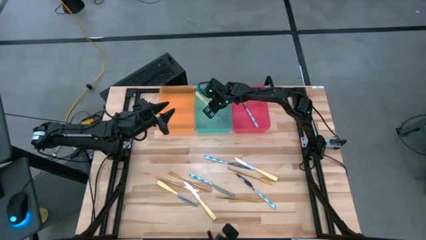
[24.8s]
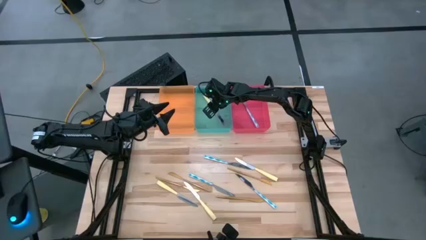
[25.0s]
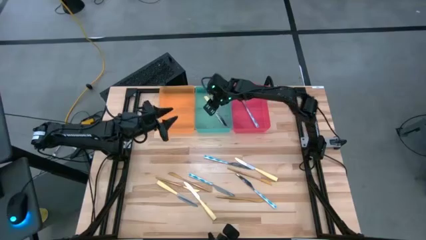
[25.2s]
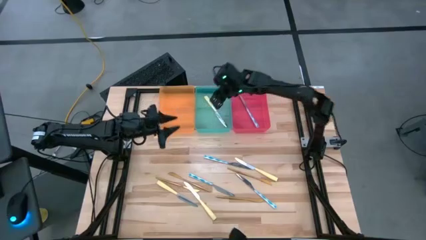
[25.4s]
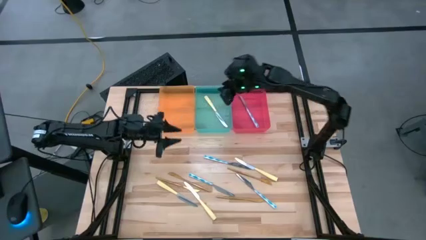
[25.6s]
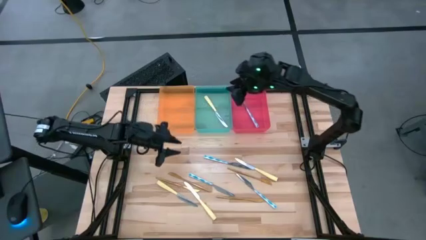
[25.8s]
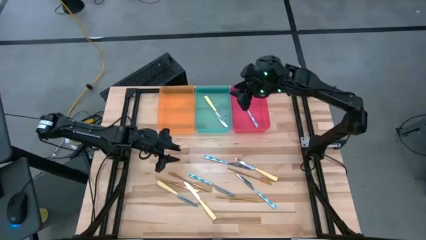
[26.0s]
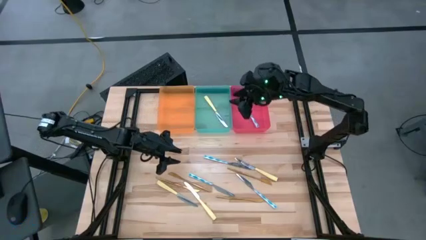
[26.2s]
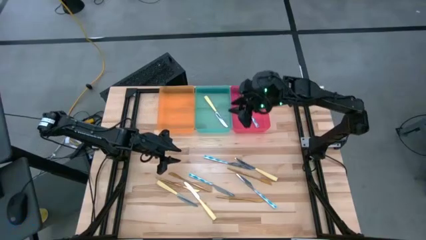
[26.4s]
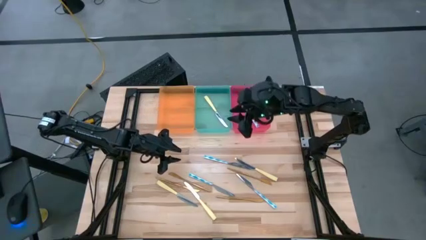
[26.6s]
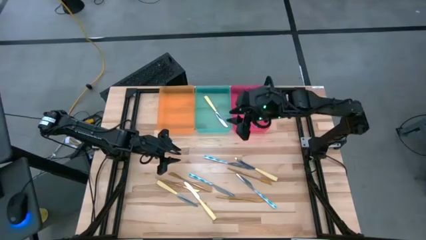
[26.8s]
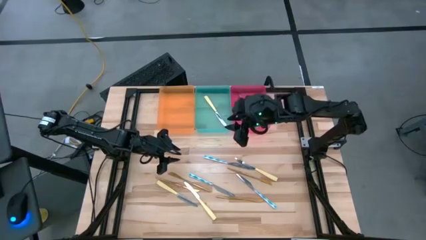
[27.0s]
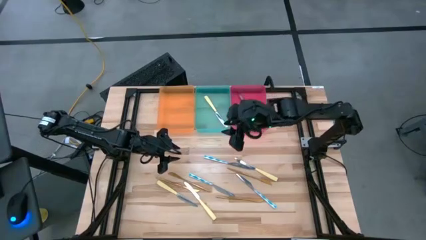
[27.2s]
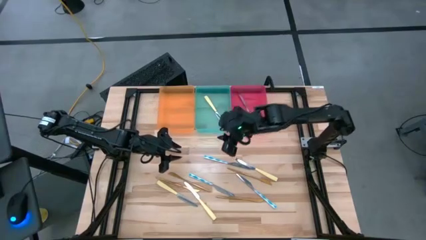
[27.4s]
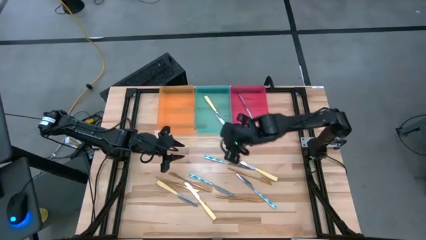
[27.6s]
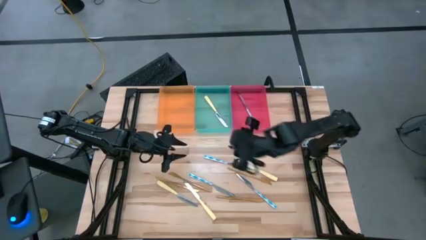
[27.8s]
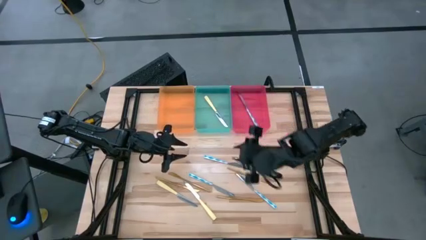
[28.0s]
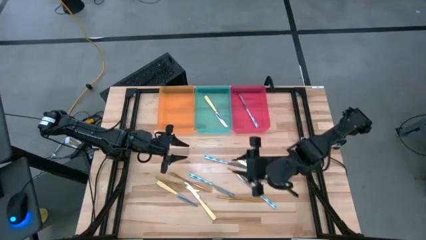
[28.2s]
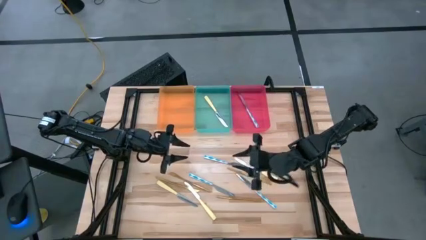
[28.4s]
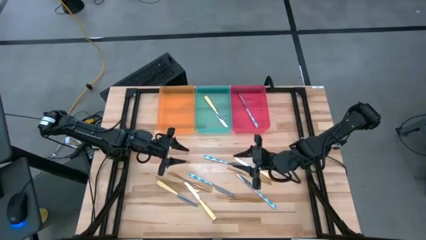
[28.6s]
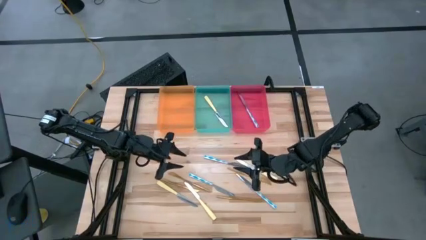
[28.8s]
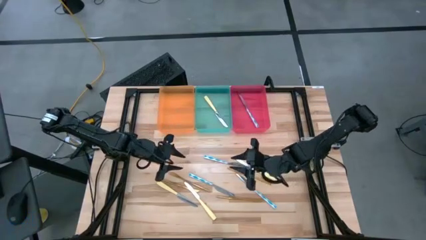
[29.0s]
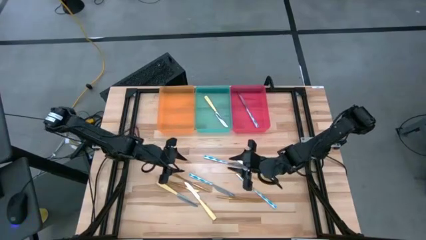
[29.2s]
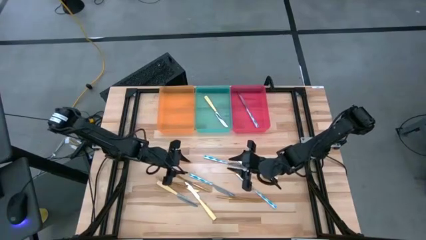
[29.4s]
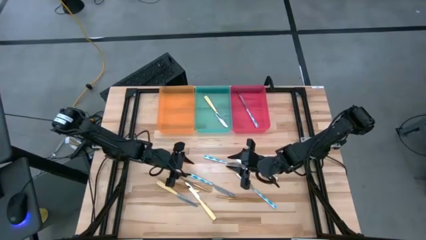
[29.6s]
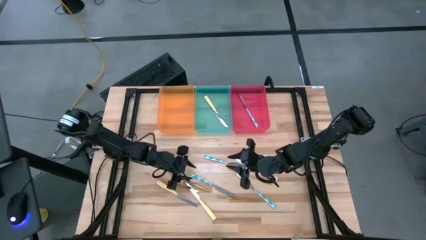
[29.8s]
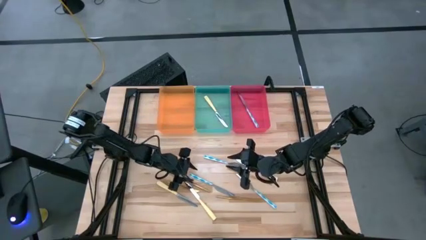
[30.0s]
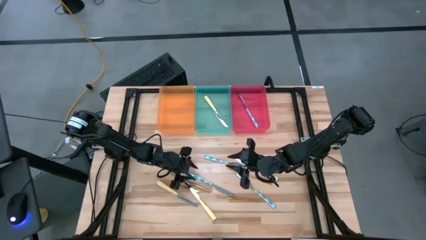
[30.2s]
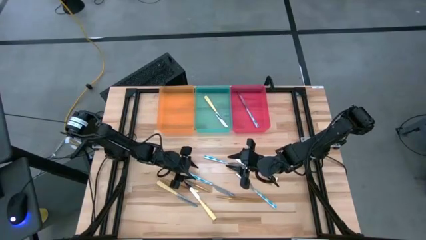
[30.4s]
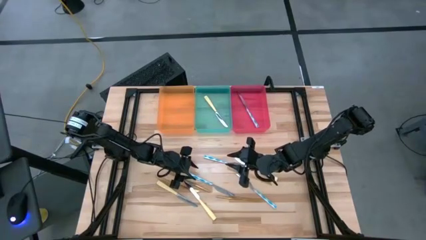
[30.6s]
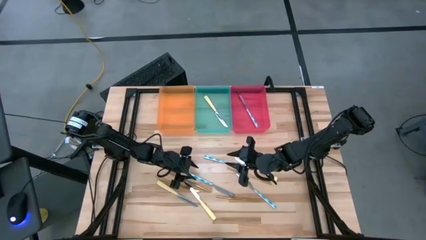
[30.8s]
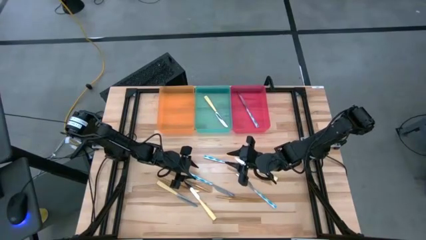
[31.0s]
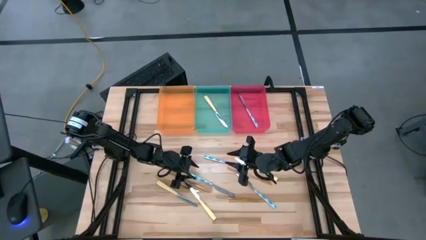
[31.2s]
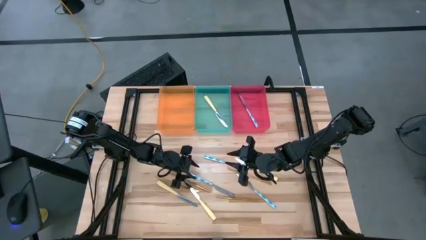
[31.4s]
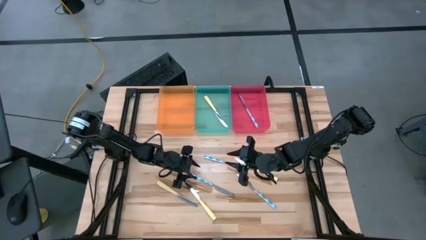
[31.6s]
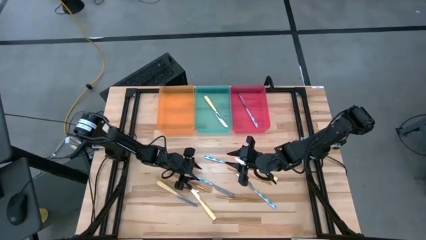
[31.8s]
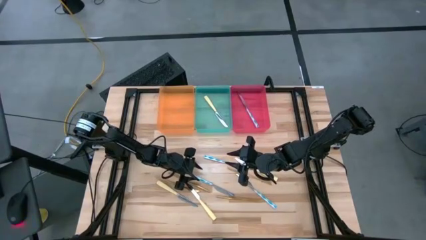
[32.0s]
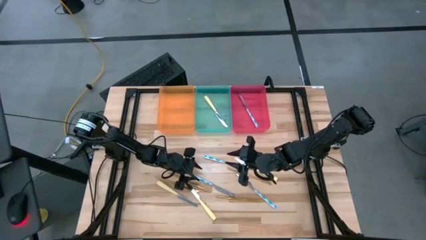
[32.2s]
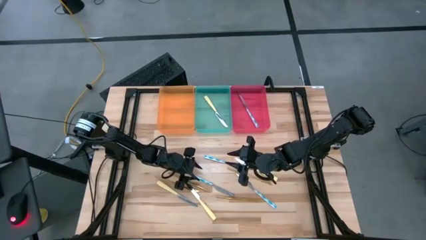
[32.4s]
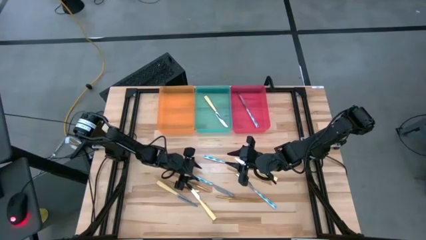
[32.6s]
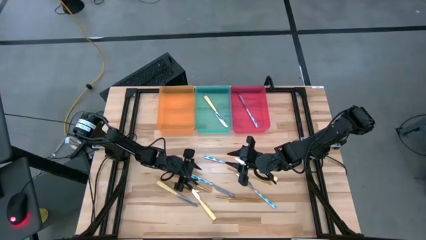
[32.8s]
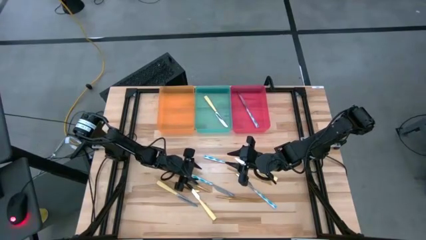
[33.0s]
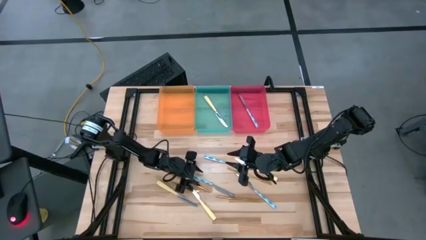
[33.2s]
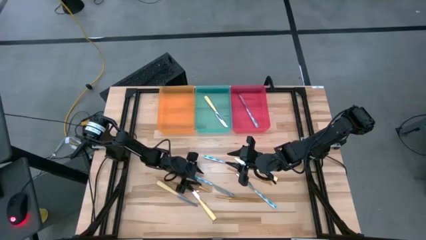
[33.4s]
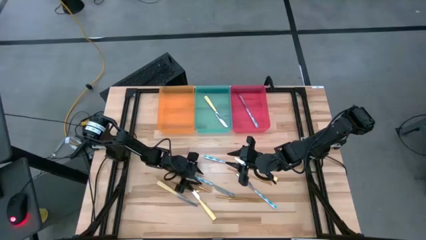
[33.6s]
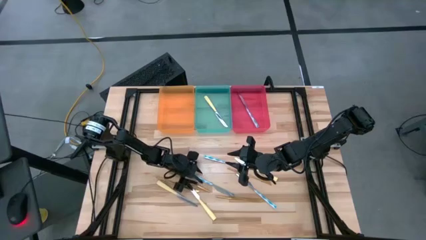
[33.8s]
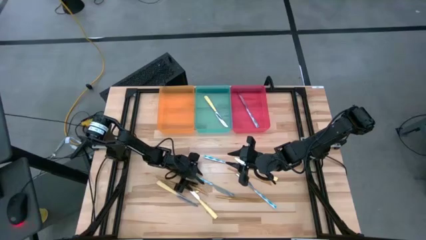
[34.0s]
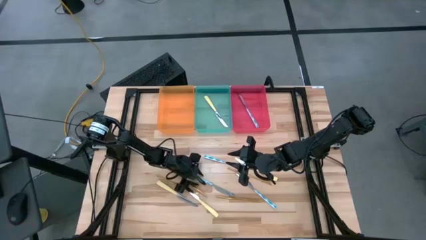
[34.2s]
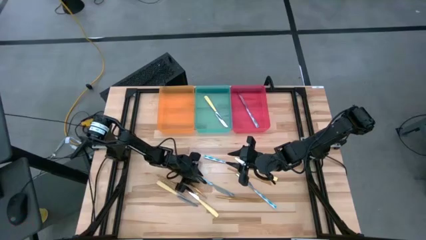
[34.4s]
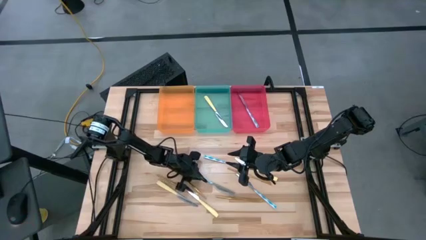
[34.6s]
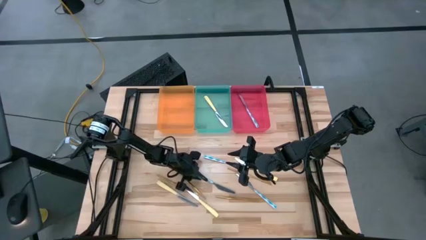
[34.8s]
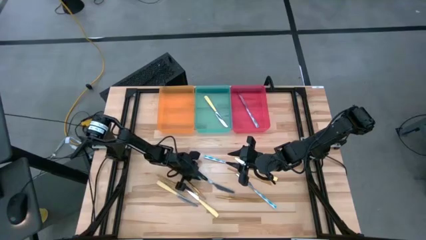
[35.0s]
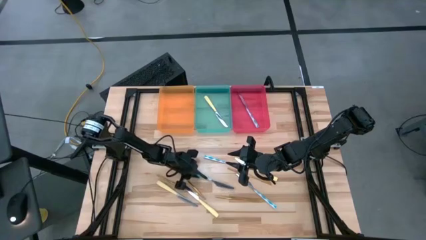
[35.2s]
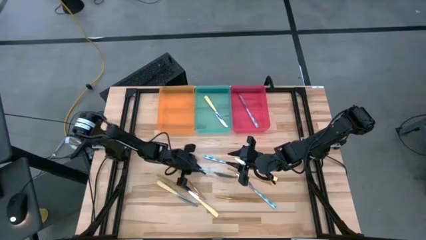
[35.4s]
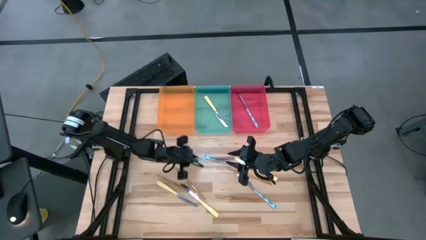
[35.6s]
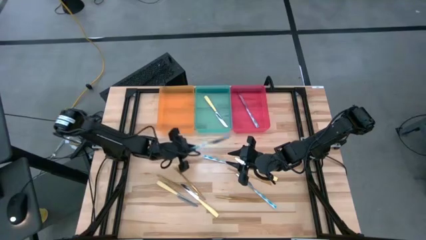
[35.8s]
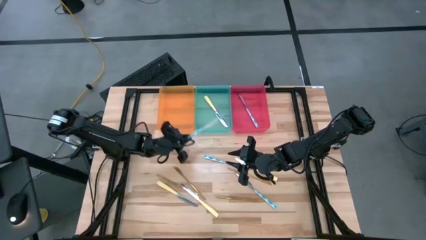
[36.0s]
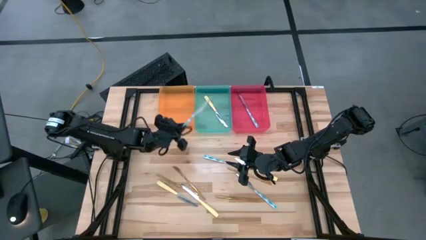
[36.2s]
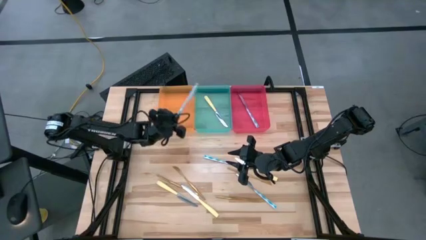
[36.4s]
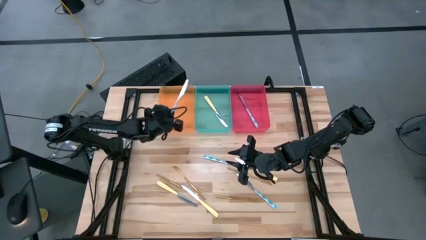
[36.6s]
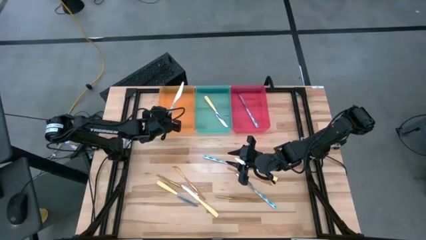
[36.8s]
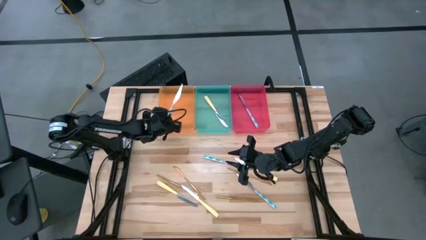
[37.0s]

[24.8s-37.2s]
Task: Sort silverware by color (type)
Put the blue patterned table knife into the red bin

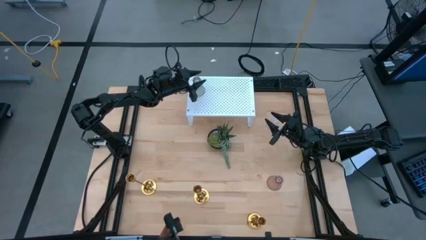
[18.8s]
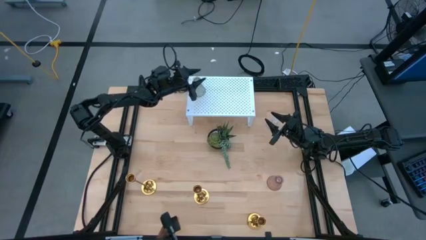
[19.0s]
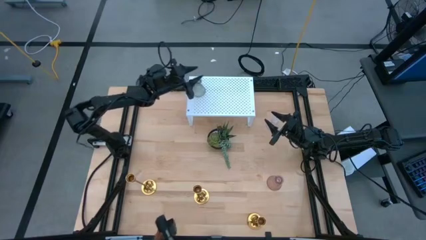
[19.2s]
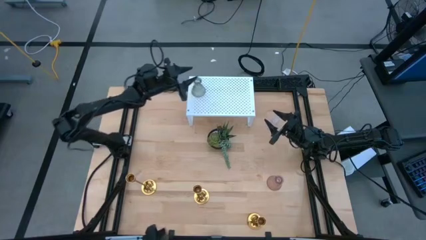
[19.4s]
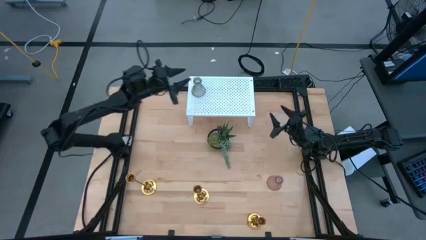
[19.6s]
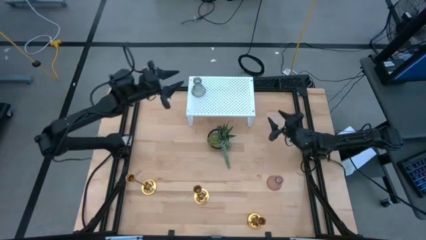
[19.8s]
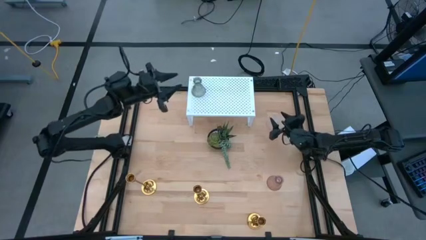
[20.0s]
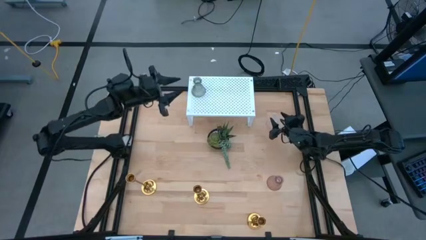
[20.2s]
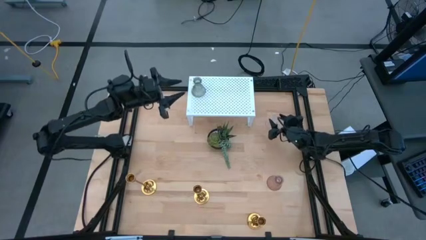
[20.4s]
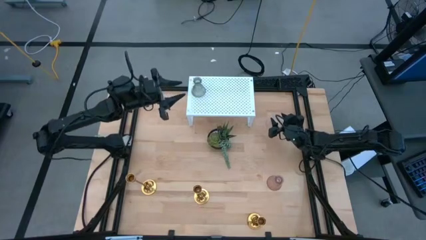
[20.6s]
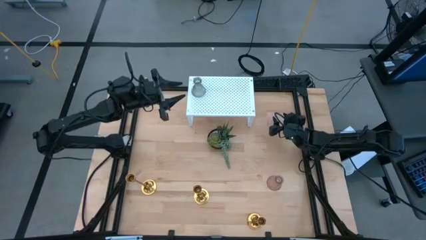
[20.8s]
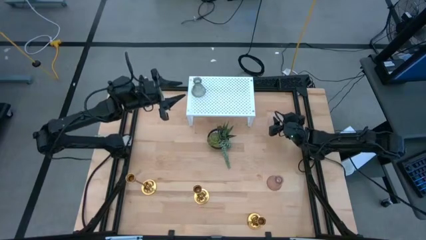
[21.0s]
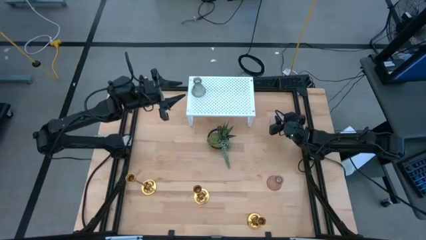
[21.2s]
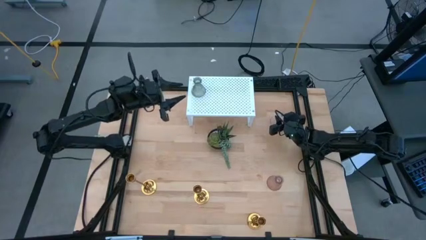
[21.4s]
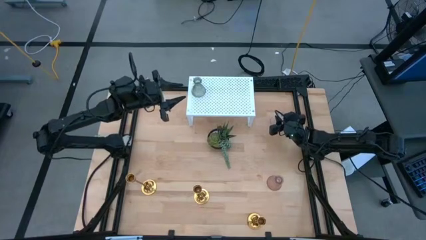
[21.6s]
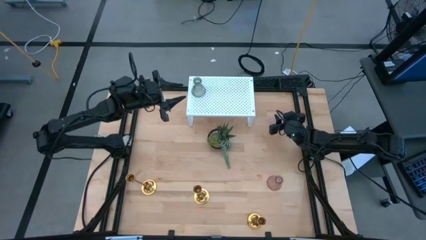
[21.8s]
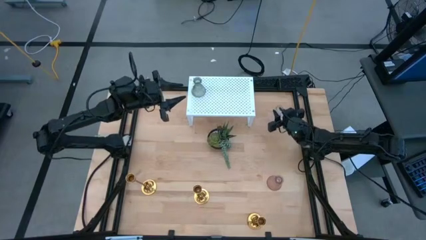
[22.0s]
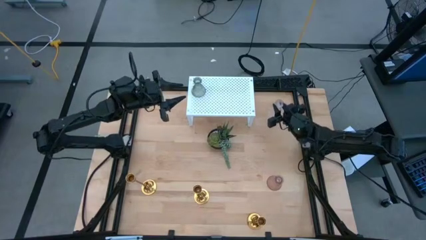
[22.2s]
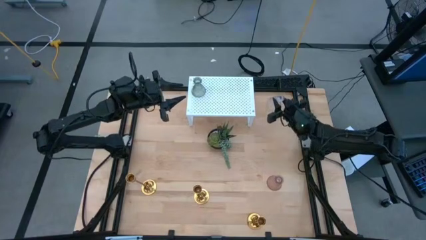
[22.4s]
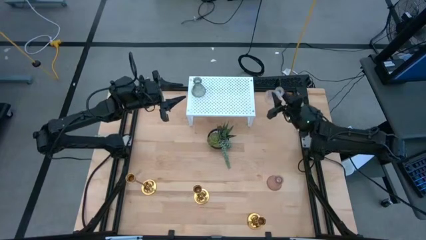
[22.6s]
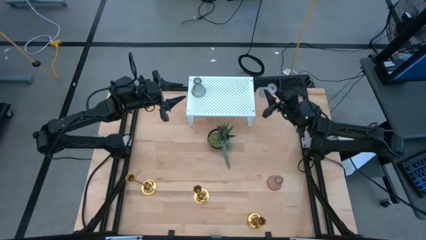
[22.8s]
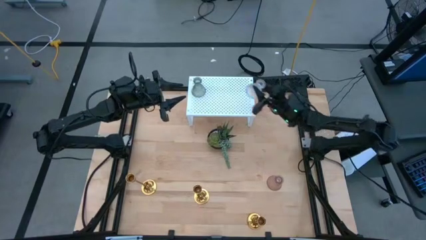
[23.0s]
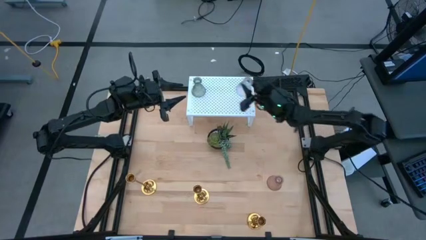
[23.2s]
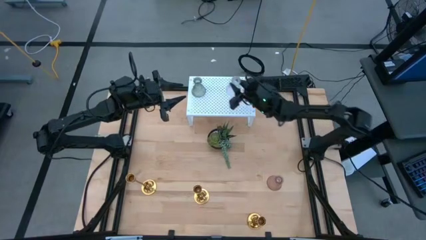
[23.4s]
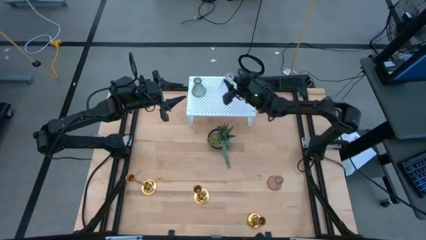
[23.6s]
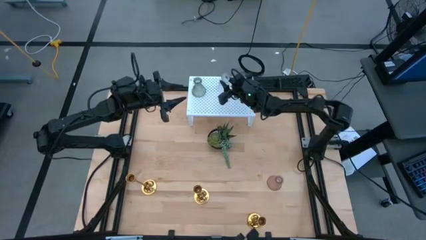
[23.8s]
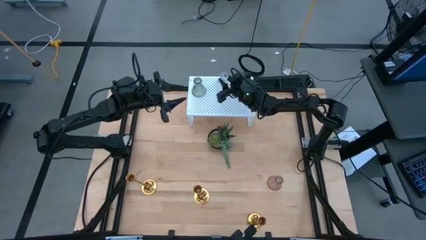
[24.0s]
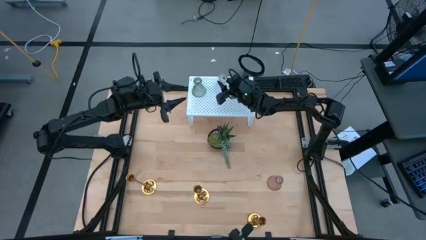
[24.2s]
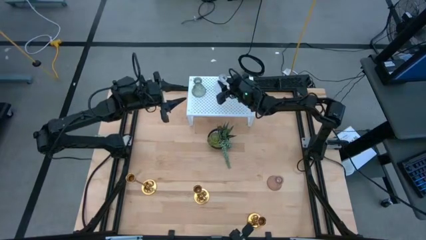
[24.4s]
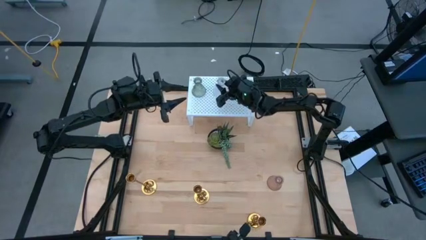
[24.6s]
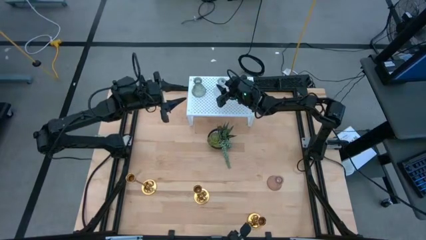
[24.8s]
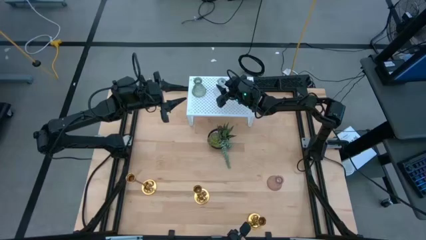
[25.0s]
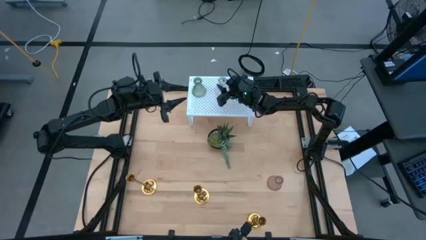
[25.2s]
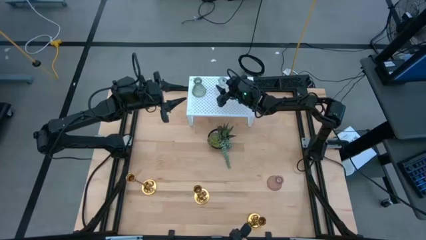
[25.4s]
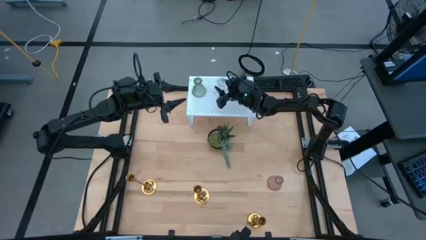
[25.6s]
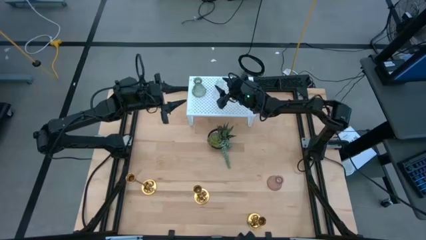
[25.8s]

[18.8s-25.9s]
Task: Pick & Place candle stick holders
Put the transparent glass candle holder on the shelf
